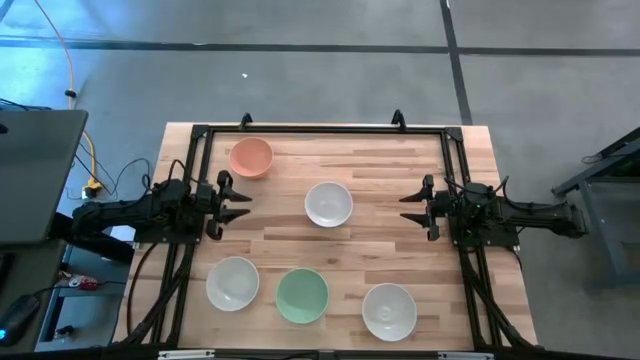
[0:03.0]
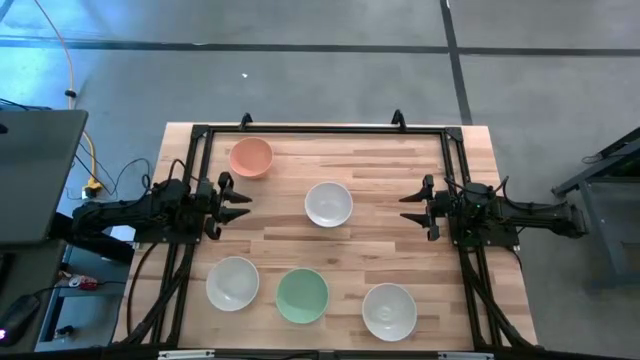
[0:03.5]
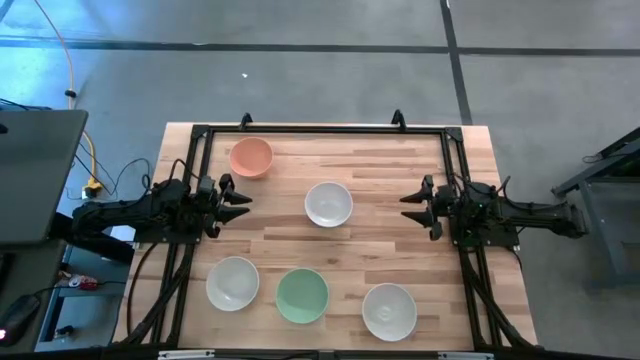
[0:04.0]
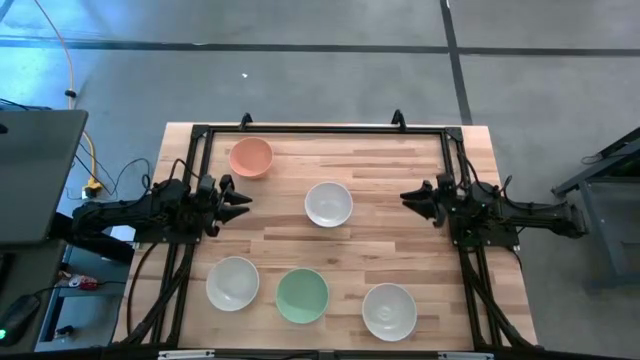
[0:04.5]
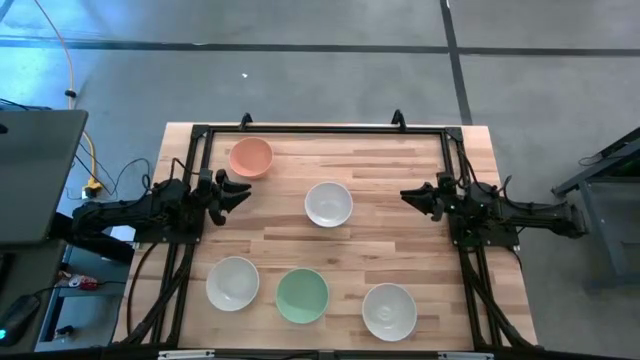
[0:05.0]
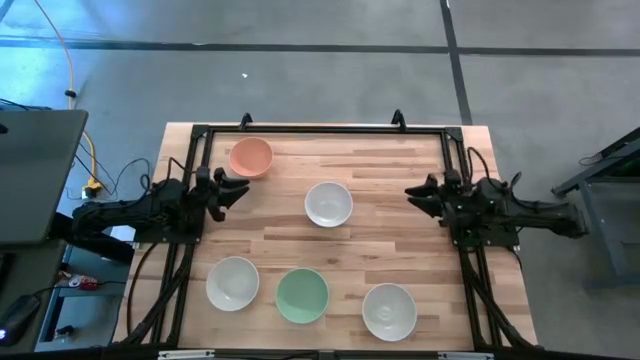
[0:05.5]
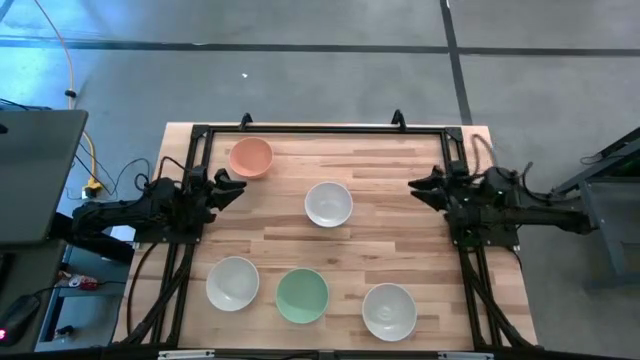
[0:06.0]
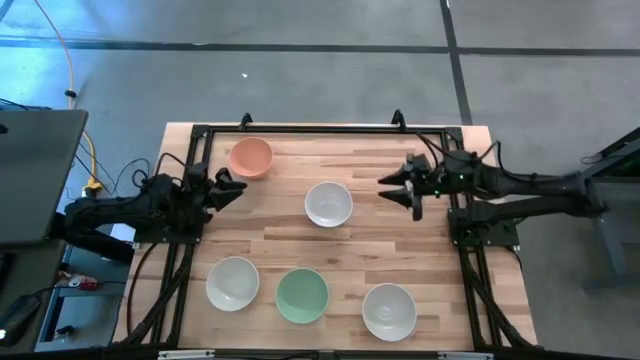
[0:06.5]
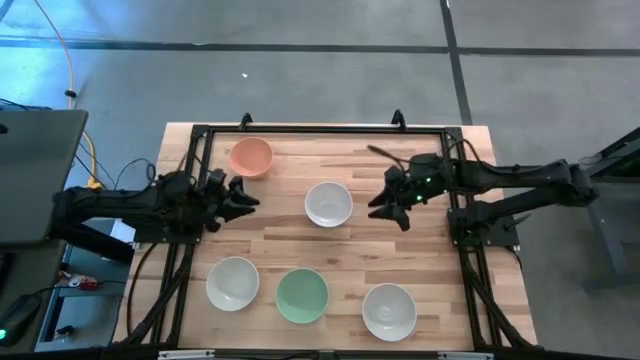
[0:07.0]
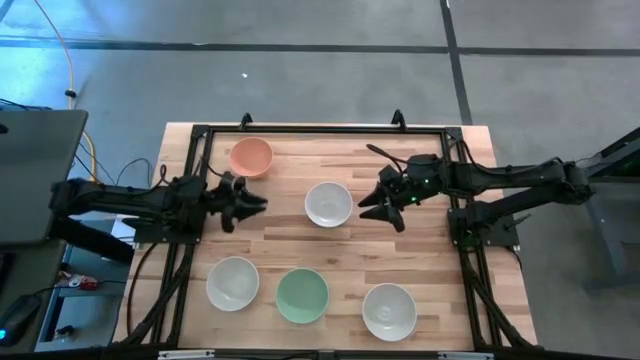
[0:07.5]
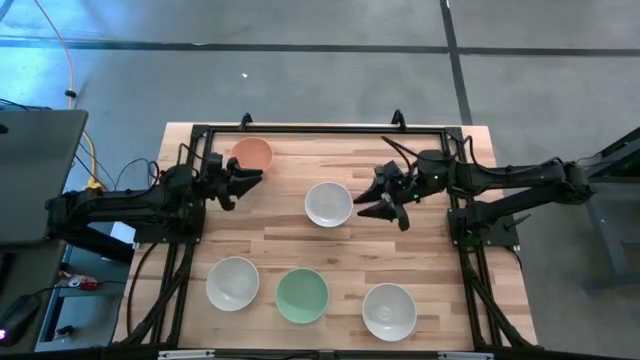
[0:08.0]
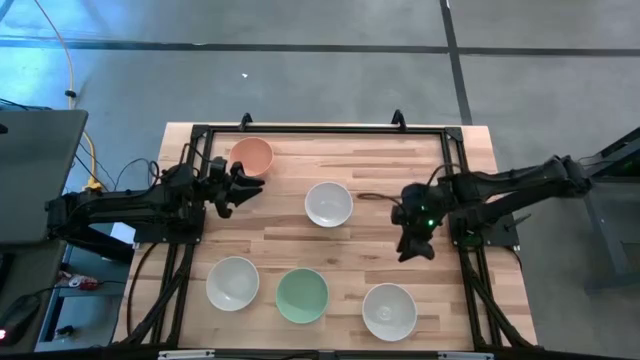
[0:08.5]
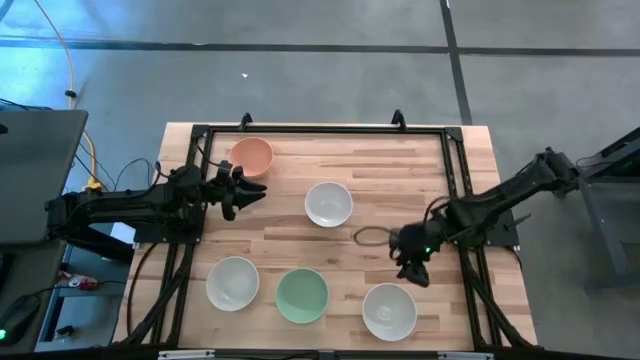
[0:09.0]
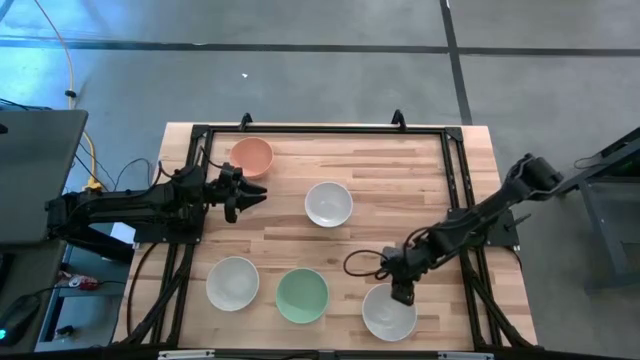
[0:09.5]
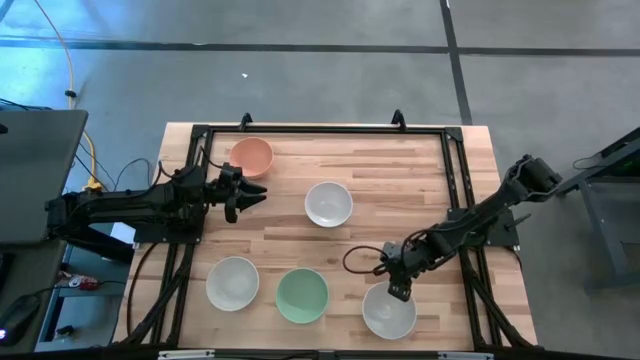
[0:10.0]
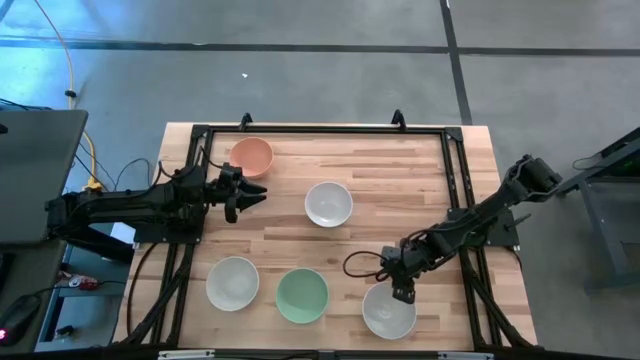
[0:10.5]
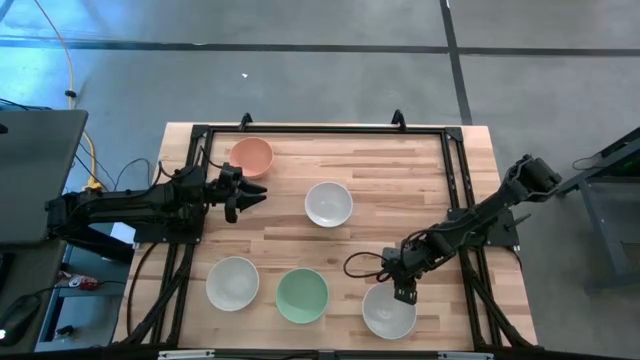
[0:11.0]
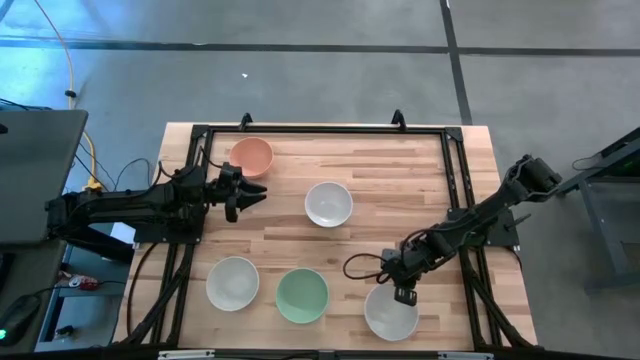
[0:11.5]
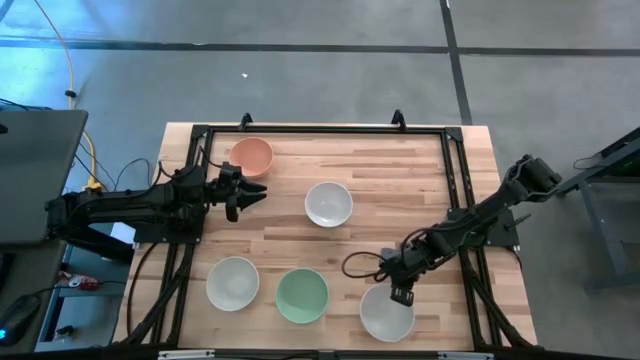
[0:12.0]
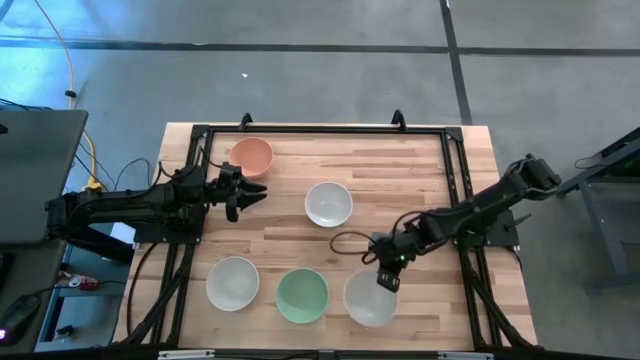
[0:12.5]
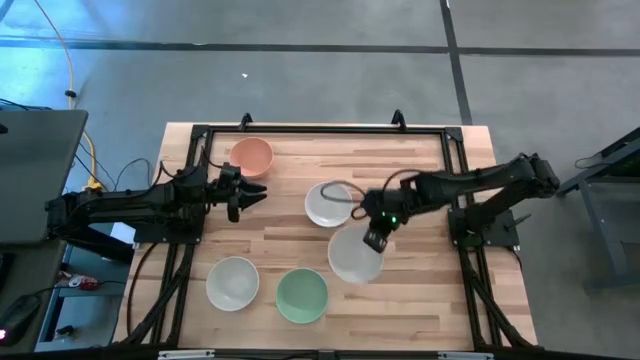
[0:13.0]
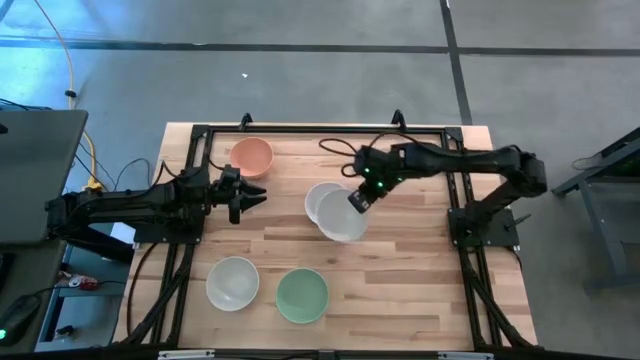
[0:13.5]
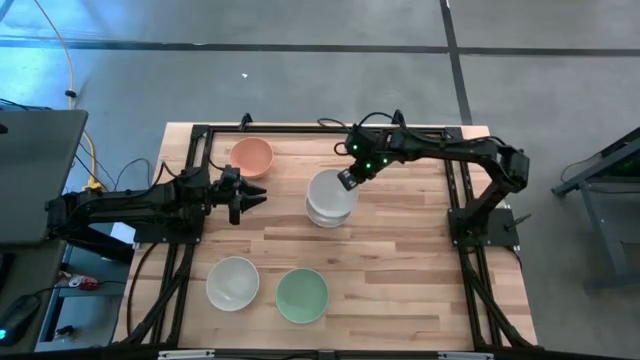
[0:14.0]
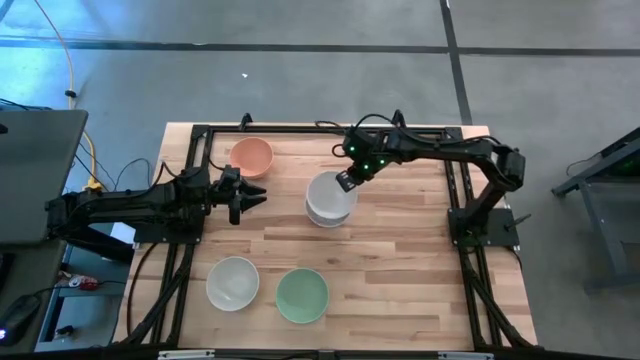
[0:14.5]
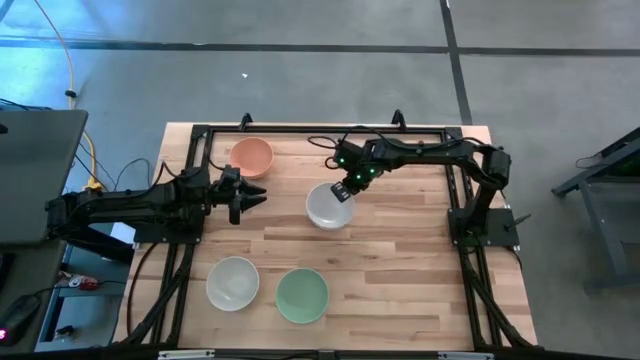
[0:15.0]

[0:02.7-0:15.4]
Task: Nest bowls inside each other
Stack the bottom right white bowl on top of the top white bowl

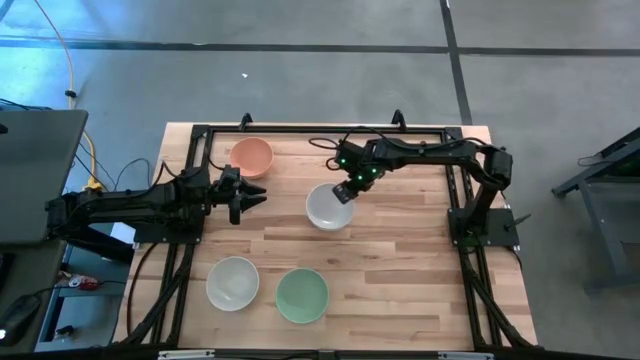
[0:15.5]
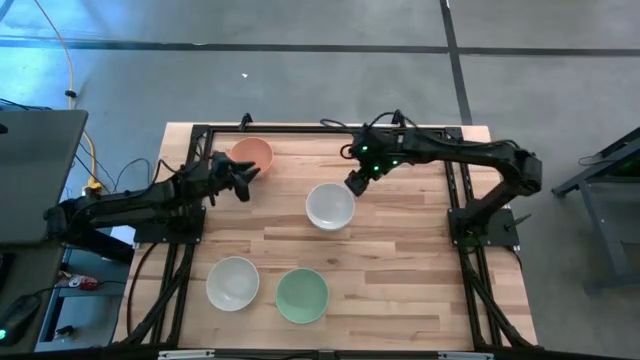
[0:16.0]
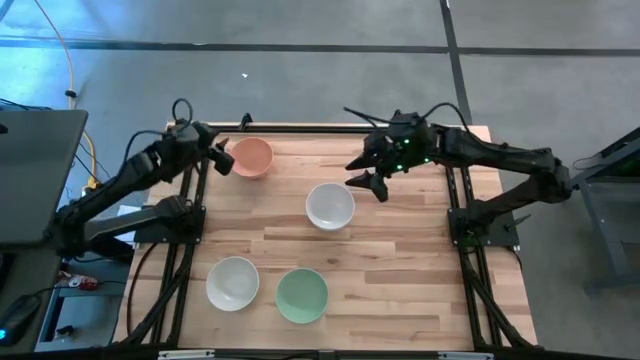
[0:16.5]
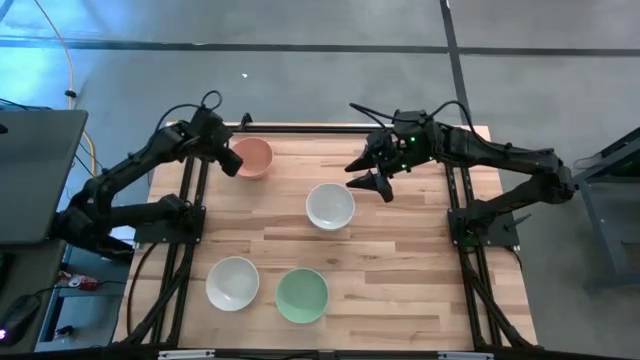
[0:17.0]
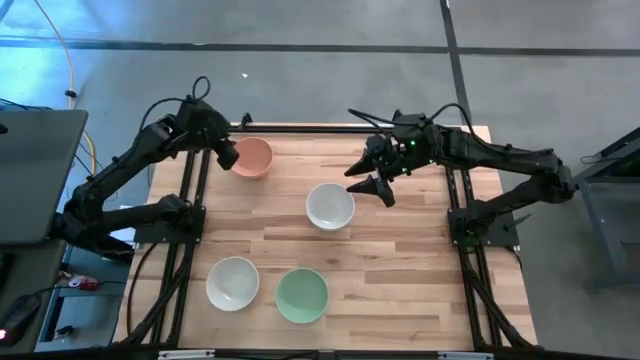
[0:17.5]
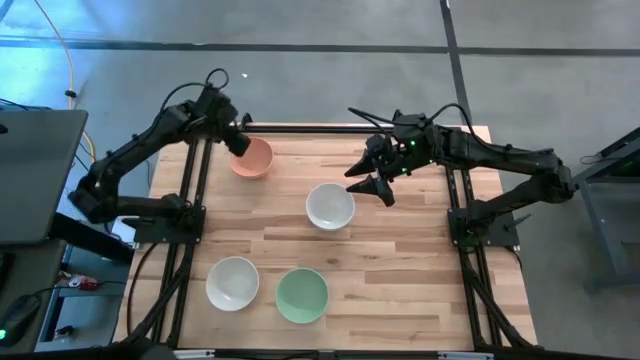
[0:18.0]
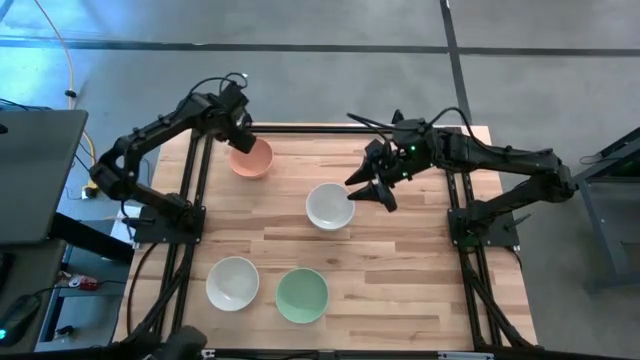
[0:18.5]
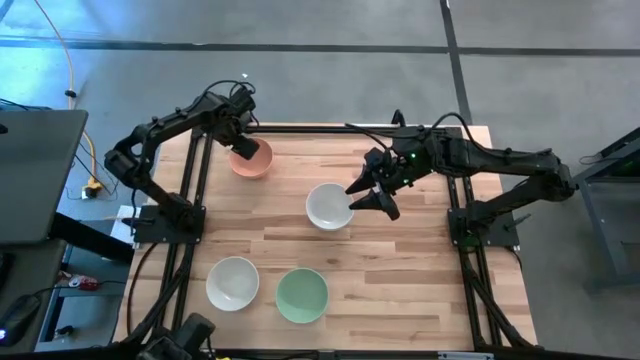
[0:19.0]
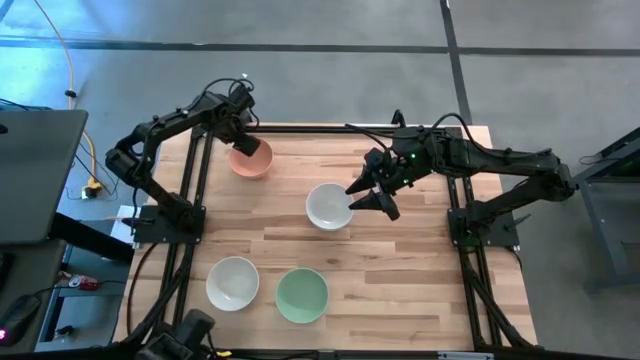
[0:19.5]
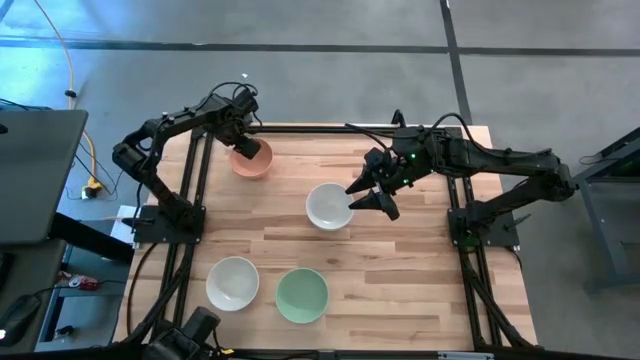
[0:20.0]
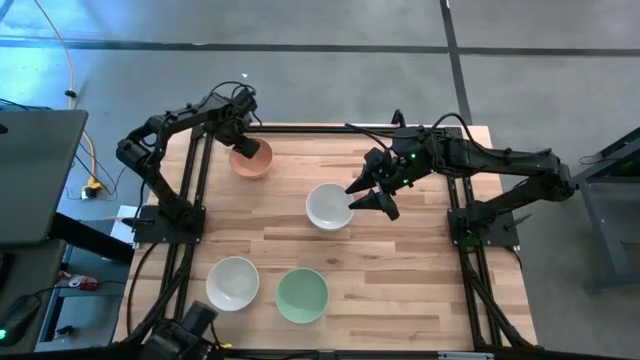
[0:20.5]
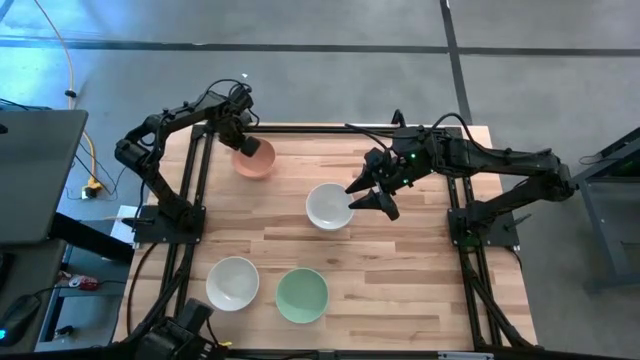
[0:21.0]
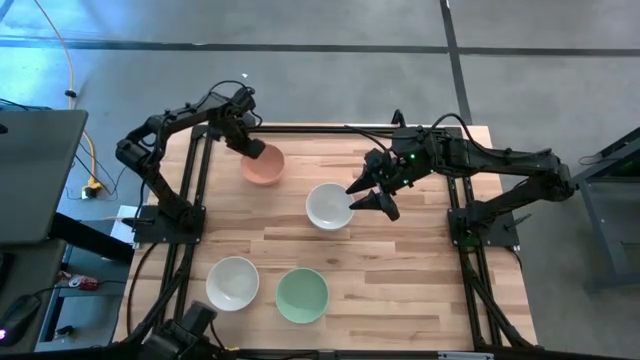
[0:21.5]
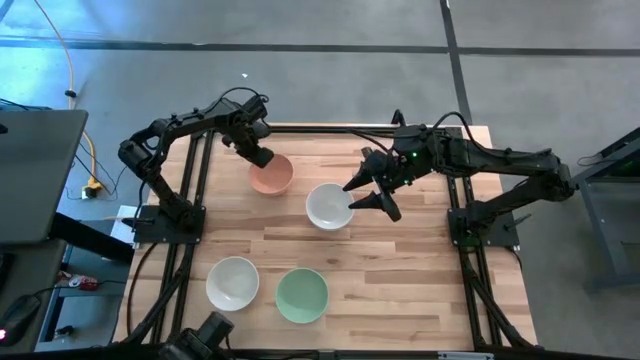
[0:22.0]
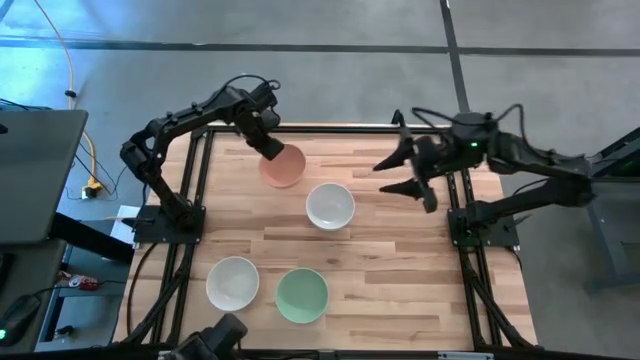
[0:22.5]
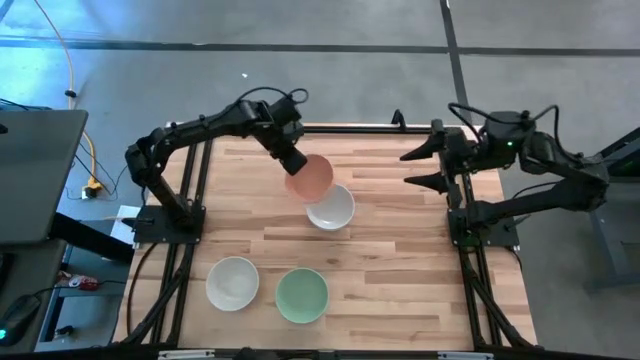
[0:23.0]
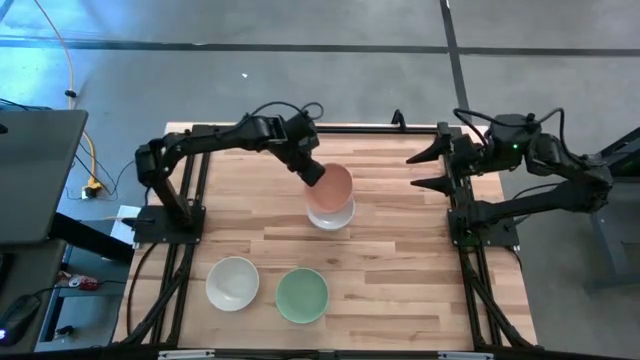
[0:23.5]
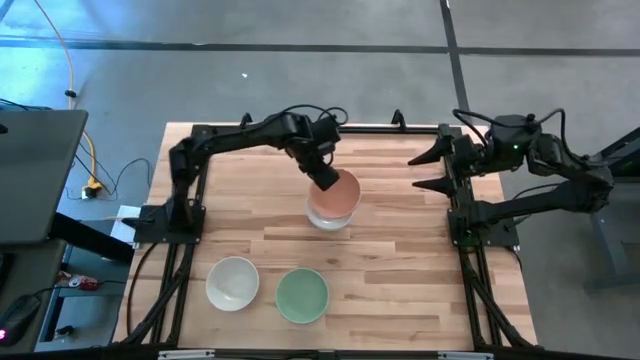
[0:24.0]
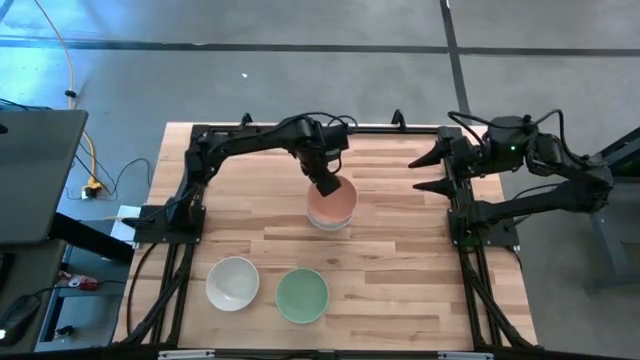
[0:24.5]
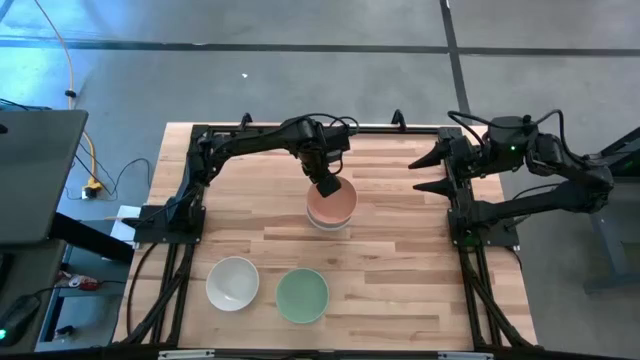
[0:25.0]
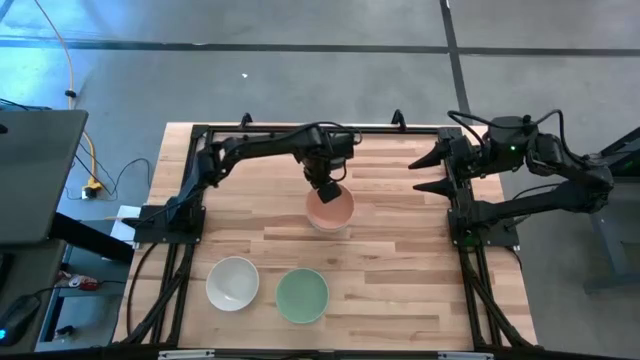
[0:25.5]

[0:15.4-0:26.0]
Stack the orange bowl on top of the white bowl
